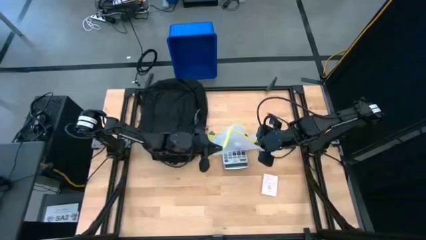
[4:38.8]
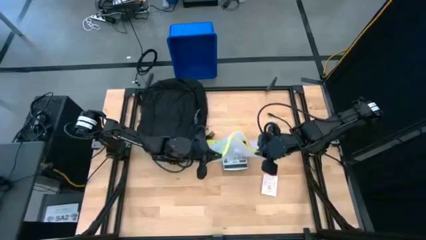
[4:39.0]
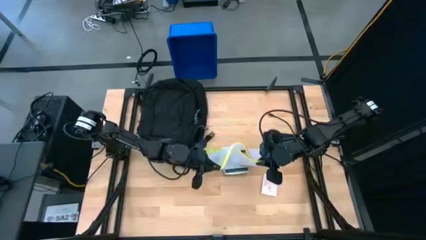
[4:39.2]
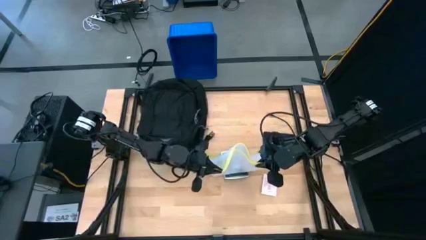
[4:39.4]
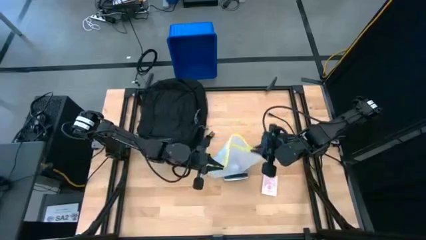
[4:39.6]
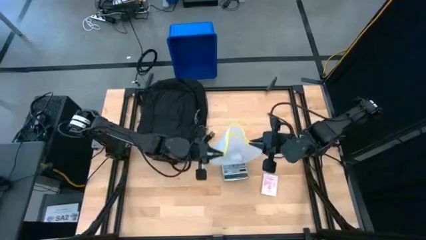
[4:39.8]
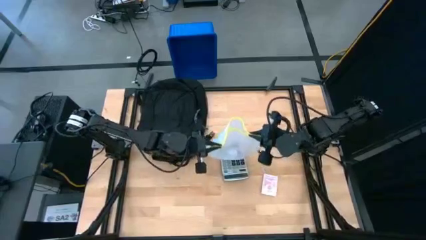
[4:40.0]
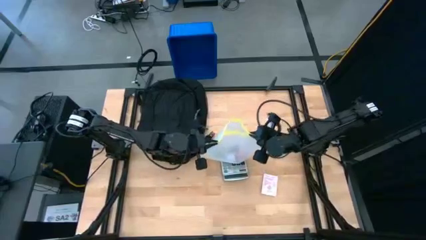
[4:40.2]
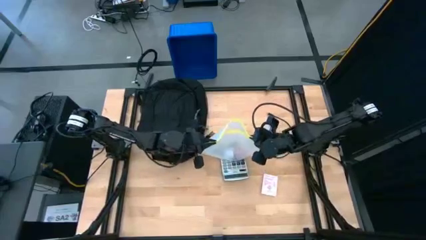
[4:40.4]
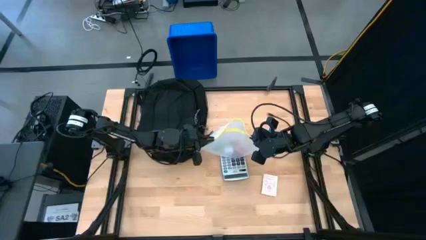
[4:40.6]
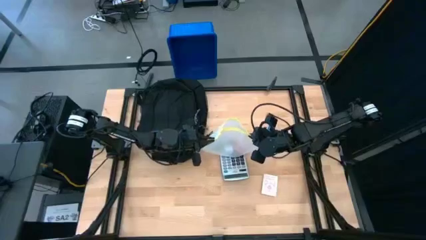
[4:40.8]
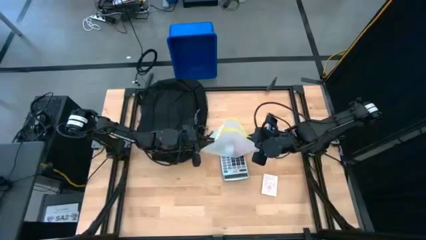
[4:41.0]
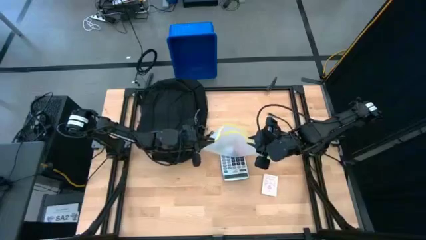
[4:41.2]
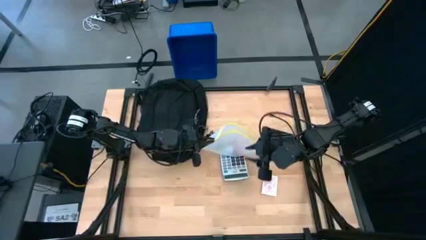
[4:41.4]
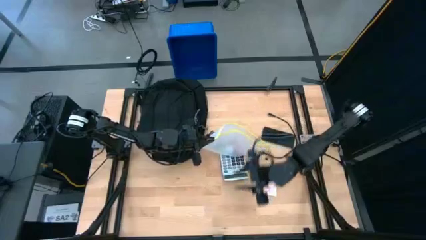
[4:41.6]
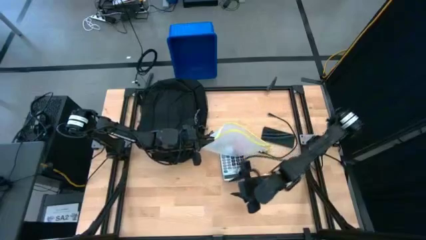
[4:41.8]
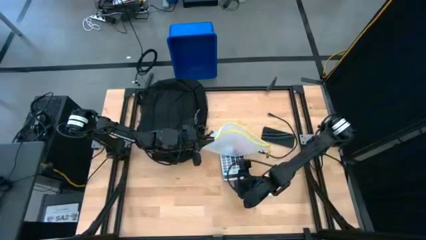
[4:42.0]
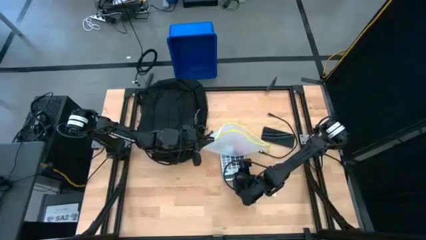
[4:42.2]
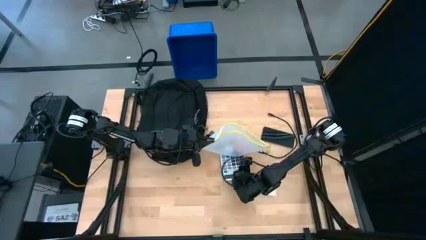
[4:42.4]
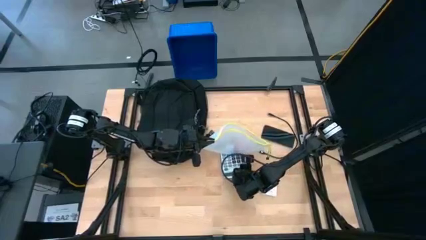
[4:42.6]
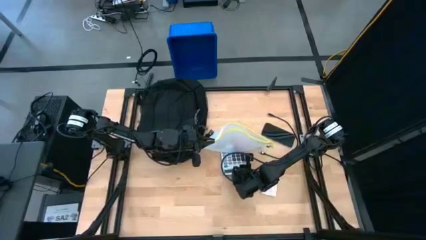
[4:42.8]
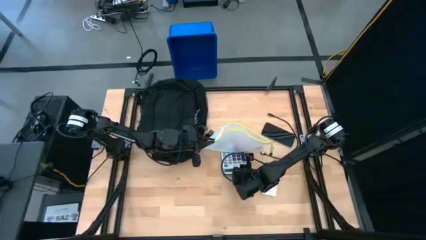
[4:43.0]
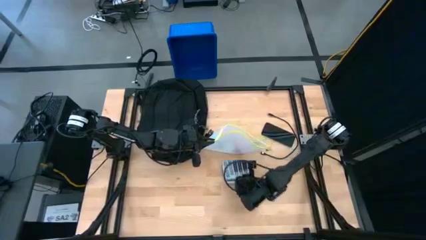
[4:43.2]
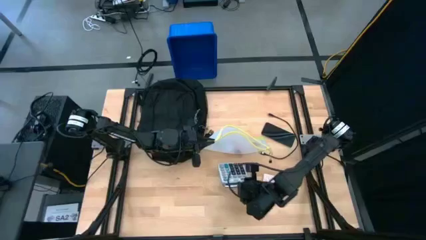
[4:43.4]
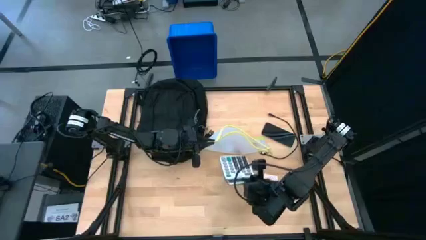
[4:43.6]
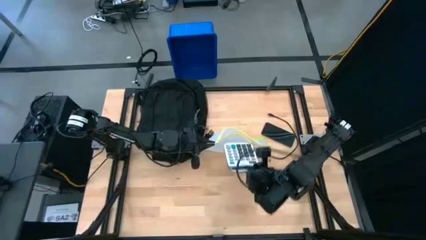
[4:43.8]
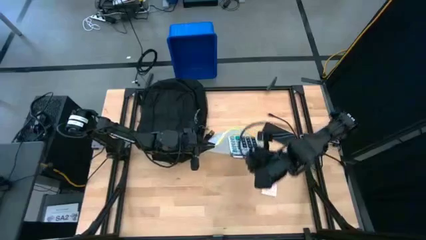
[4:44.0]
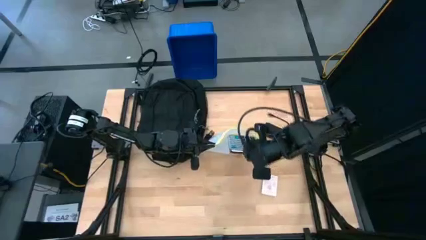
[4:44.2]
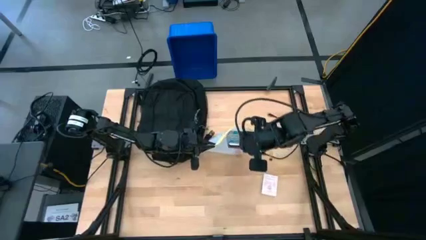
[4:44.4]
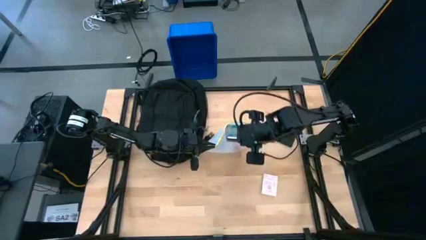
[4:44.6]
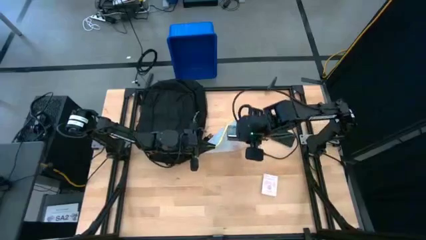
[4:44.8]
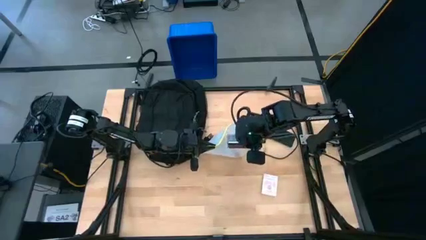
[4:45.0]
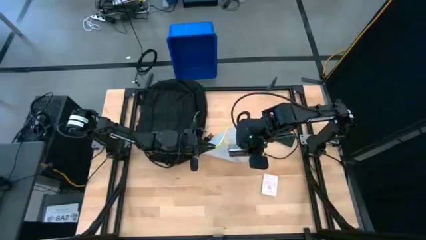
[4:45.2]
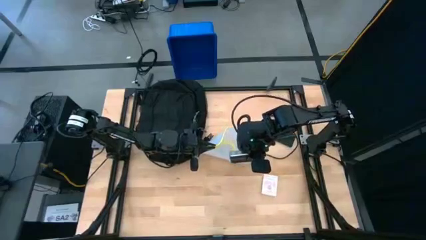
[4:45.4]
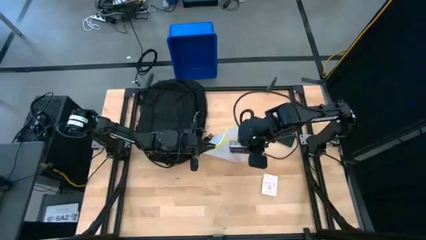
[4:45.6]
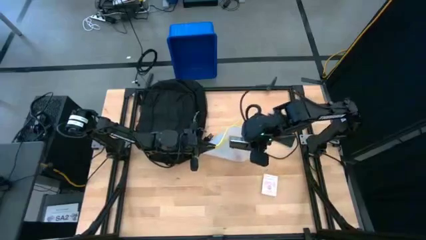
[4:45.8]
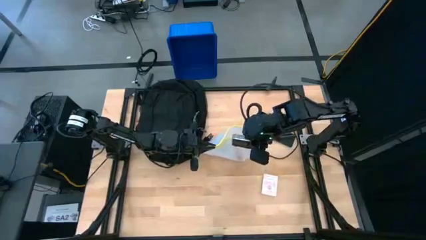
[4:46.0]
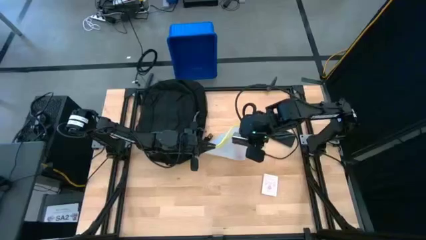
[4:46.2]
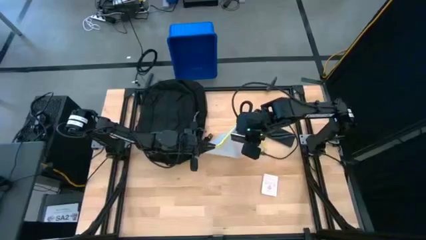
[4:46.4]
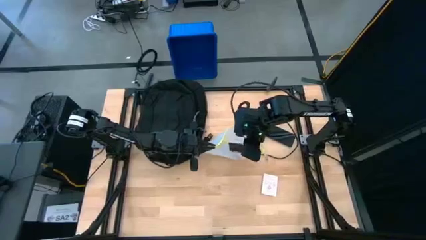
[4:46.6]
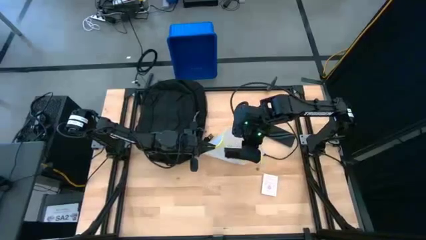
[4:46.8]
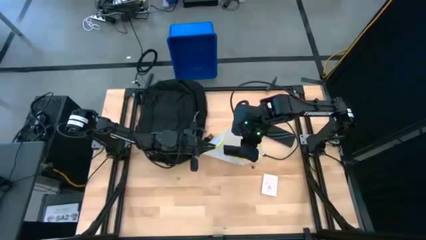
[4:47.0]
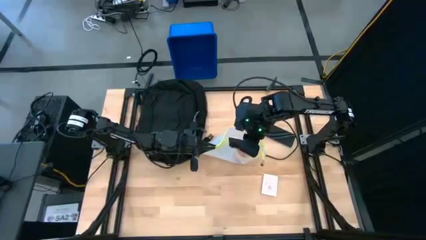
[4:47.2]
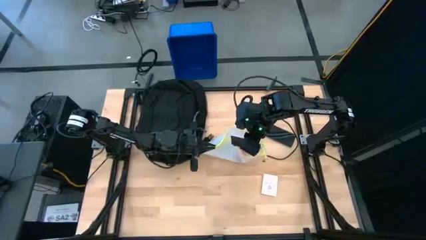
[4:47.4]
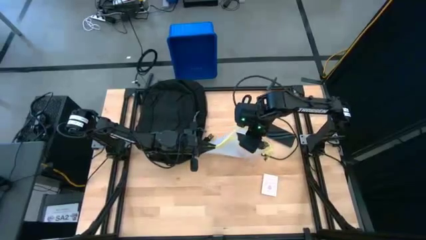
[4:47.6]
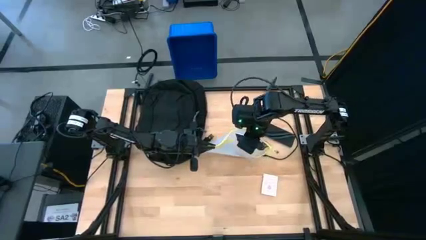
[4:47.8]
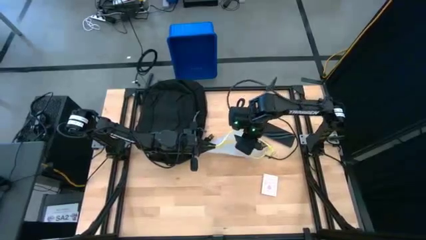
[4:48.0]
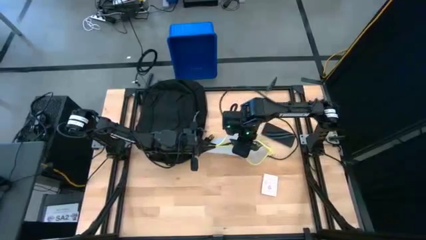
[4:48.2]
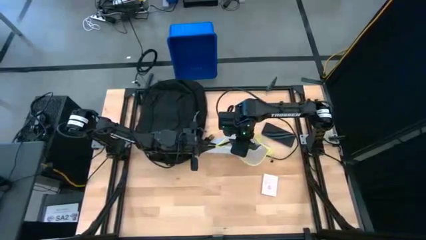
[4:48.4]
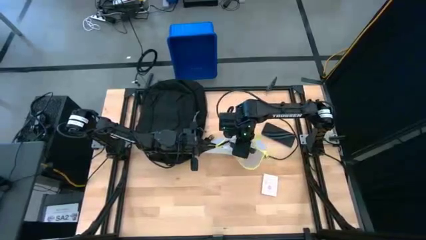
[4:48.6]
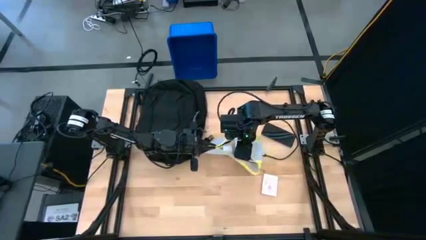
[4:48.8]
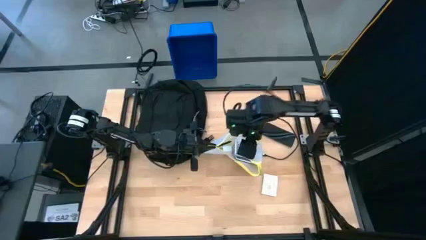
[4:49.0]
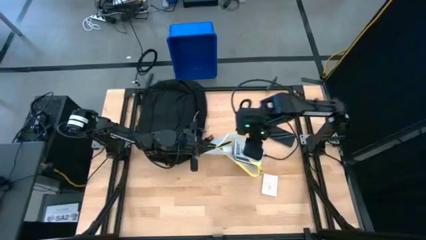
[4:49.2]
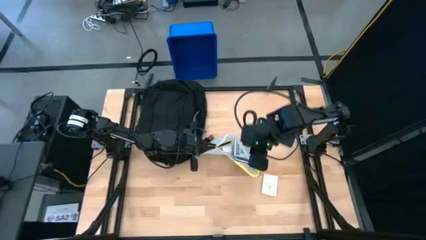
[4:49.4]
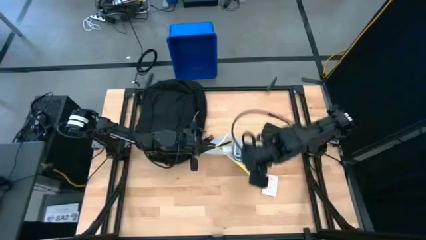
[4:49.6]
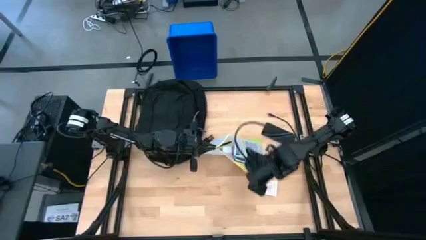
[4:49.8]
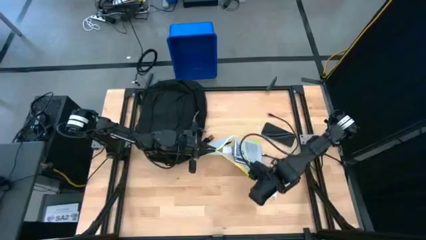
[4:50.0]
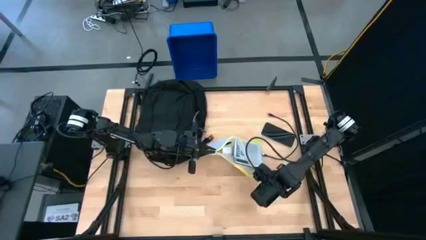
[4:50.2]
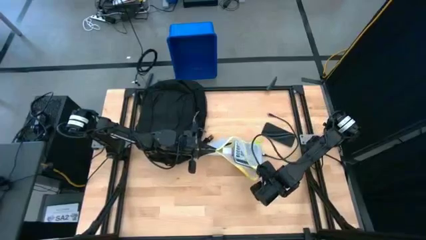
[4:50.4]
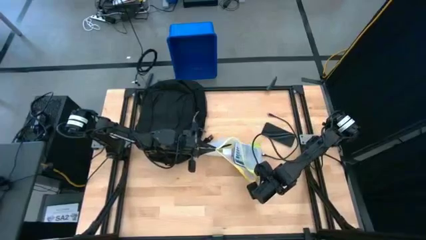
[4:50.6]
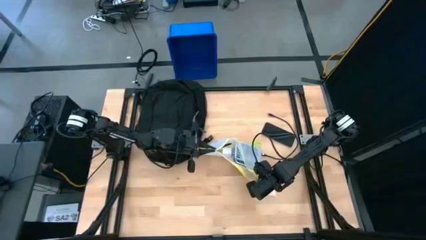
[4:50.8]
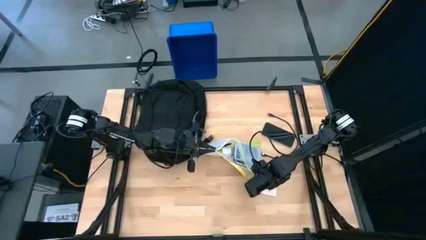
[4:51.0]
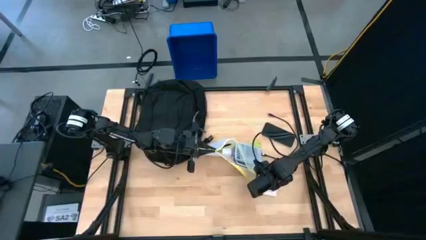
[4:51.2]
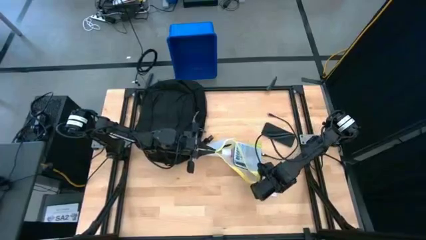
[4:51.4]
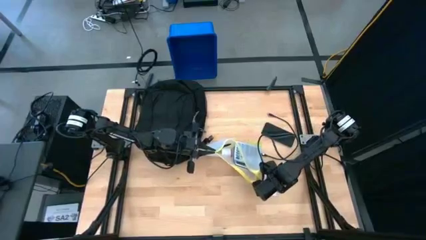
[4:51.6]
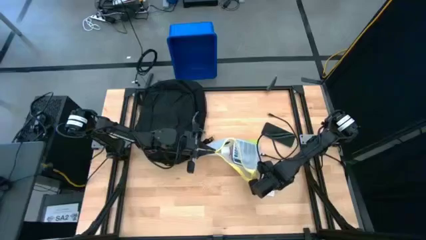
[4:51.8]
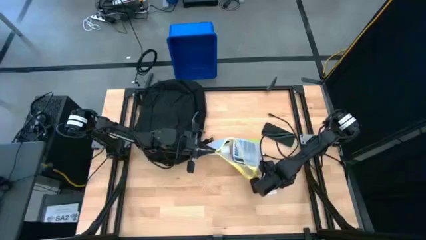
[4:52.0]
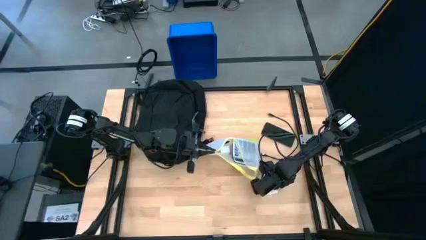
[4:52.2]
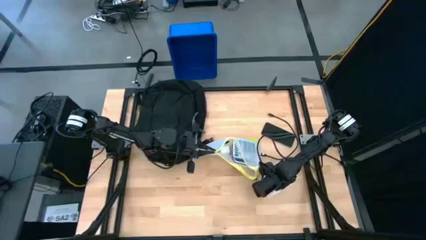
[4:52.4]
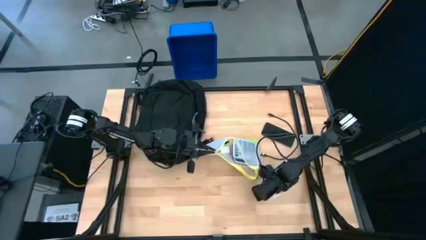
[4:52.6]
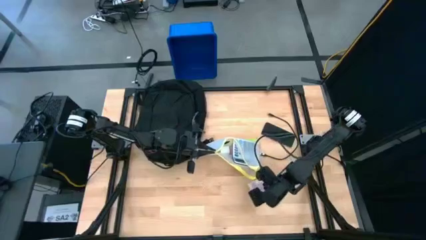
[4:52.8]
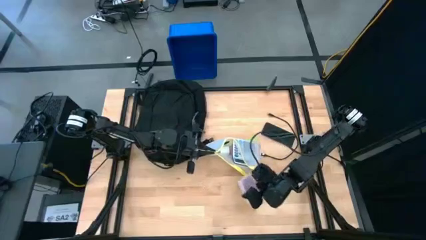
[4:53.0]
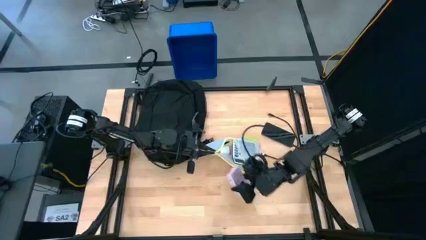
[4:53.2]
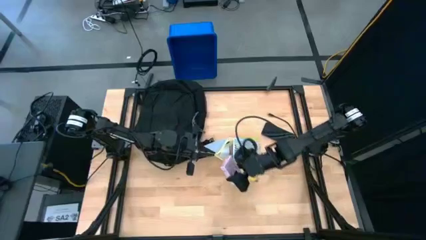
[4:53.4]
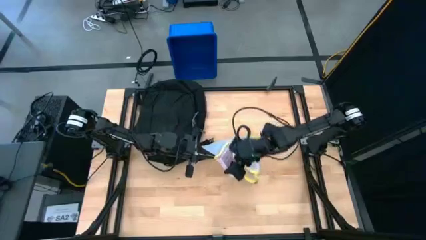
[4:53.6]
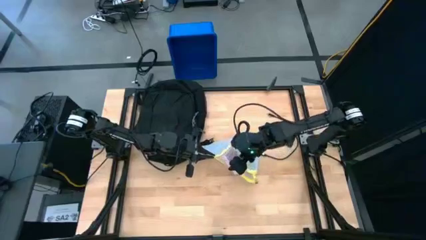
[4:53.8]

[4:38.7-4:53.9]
Task: Unpack backpack
Close the zip lock bag

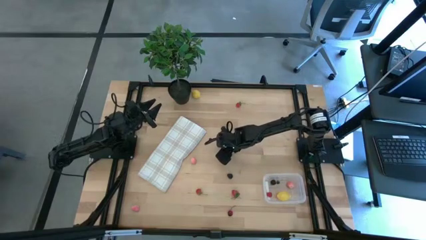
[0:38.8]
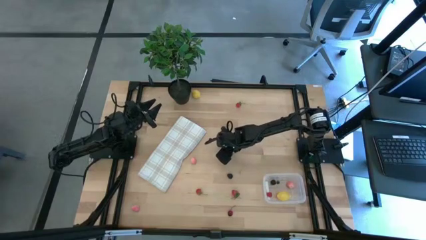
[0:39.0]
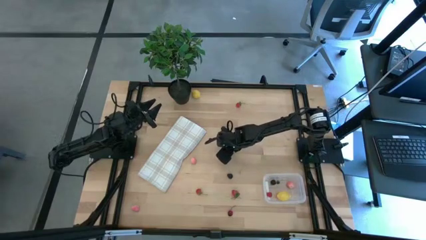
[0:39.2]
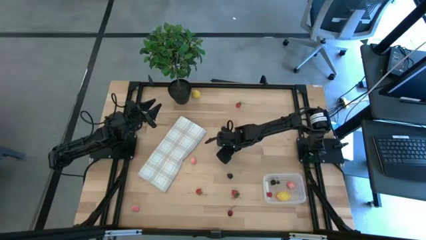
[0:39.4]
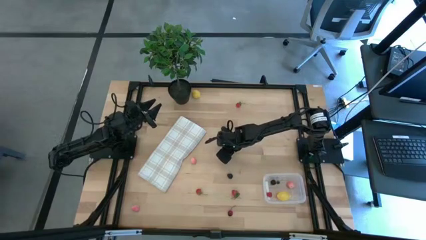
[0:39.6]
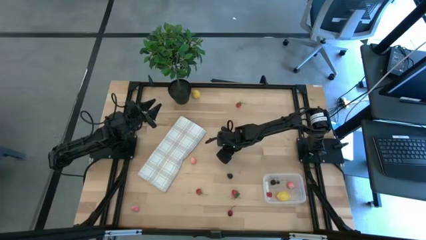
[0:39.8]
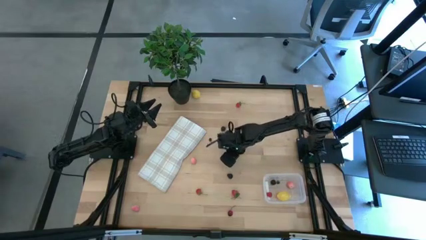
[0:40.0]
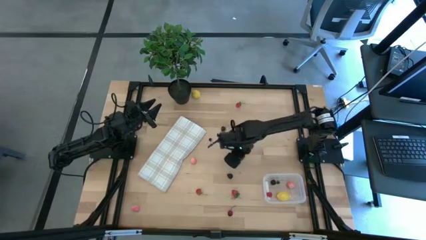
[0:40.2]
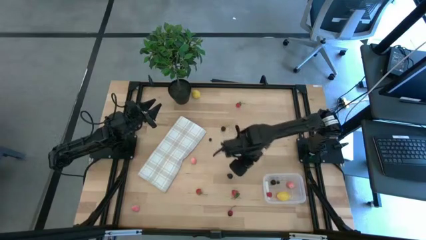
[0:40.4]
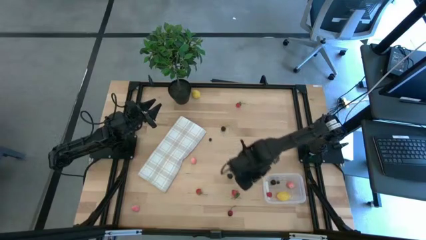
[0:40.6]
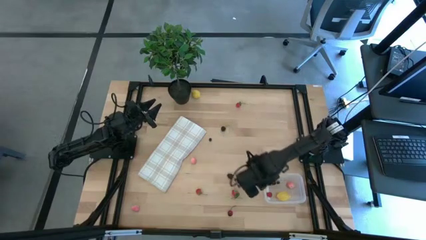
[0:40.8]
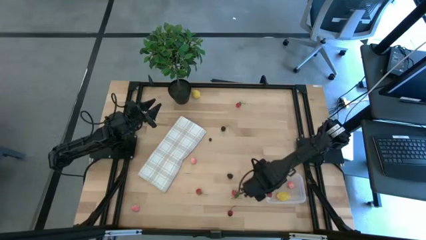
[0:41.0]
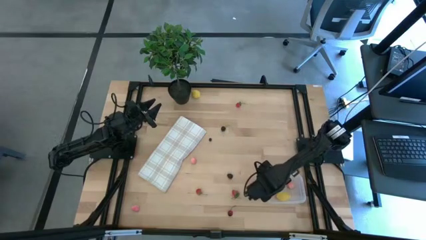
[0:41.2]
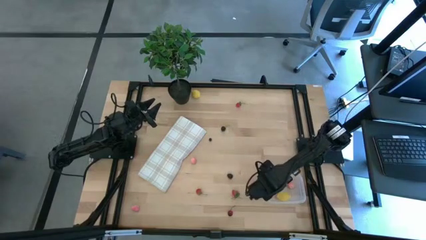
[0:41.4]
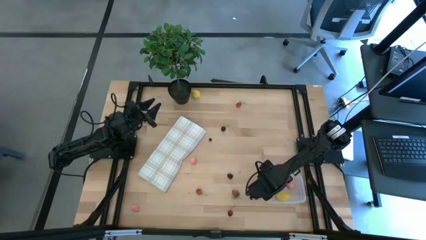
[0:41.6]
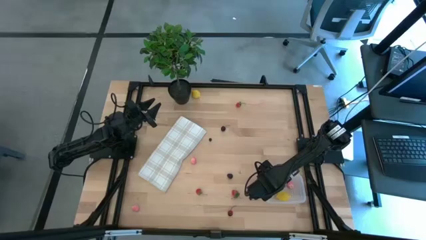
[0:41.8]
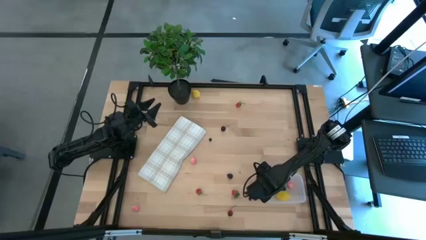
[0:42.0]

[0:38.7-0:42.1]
Task: Pick and placing Produce into tupperware
Put the top black raspberry into the transparent bin
